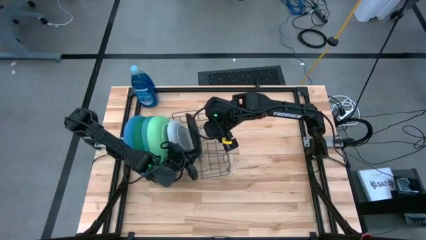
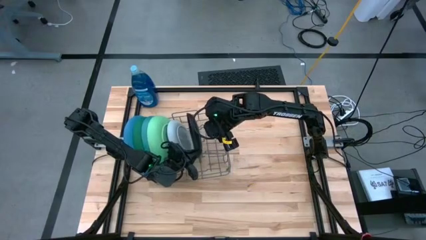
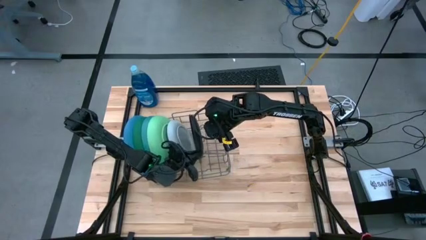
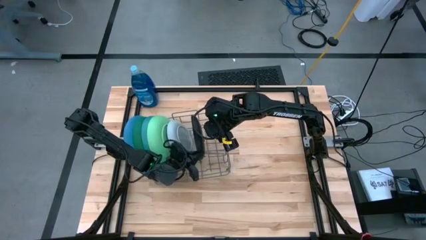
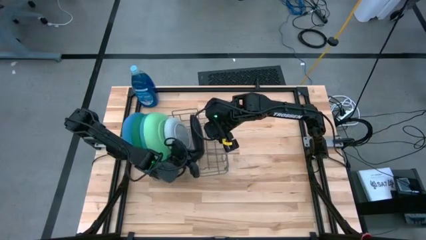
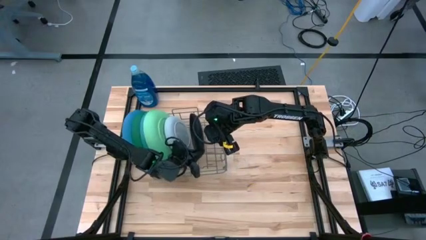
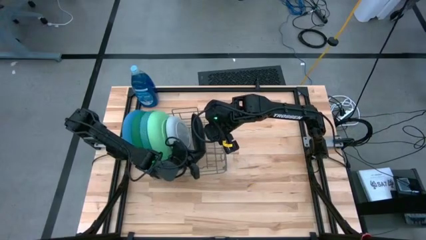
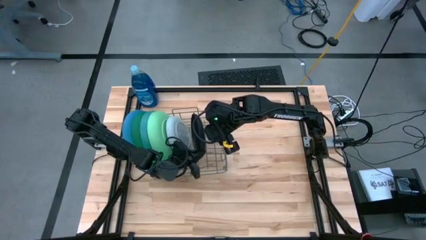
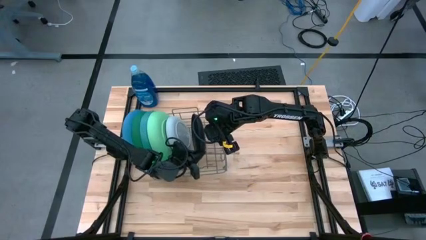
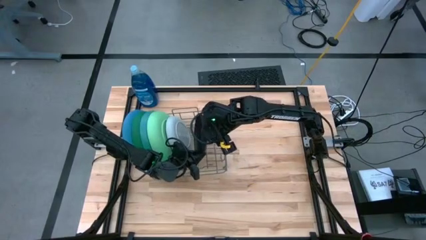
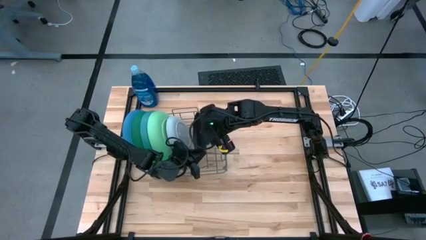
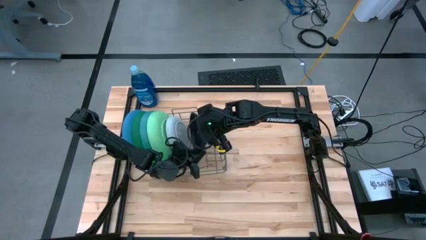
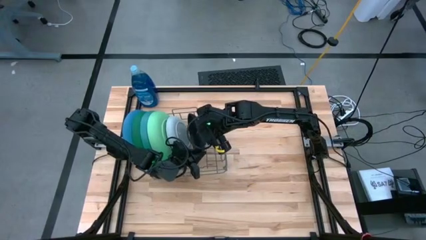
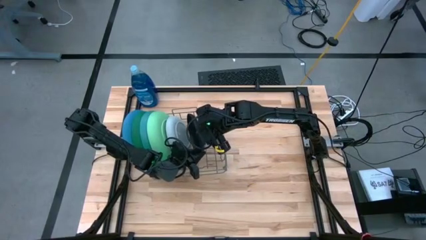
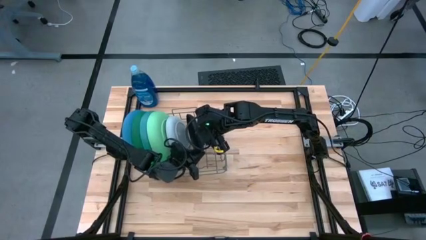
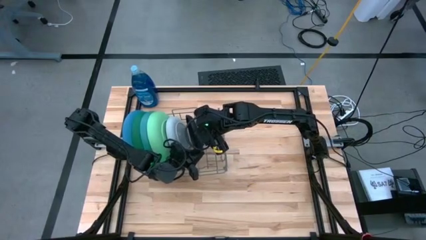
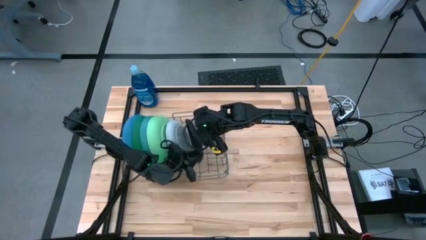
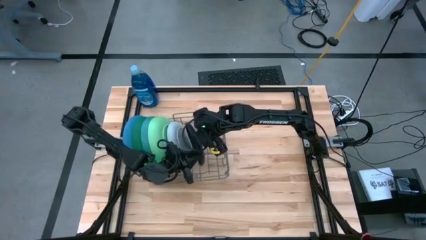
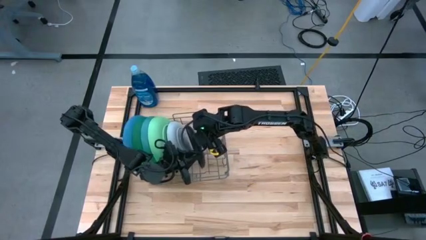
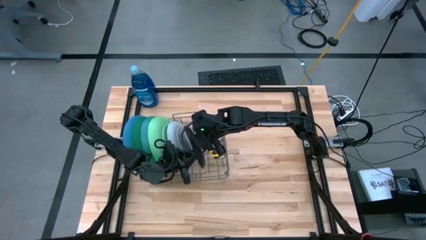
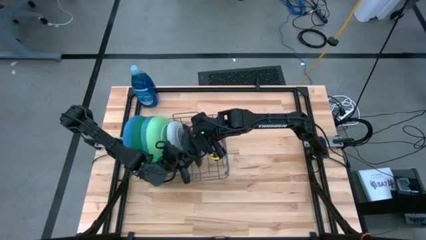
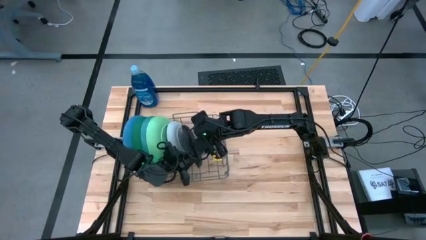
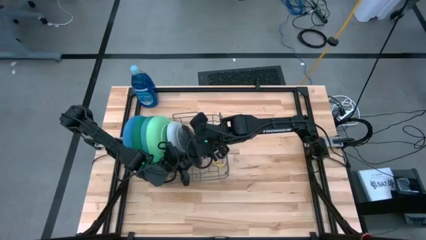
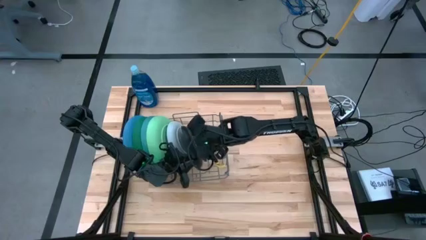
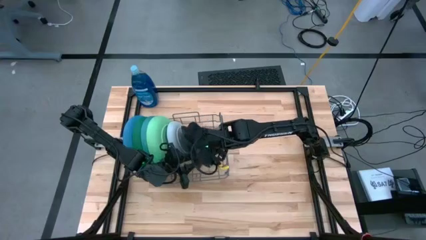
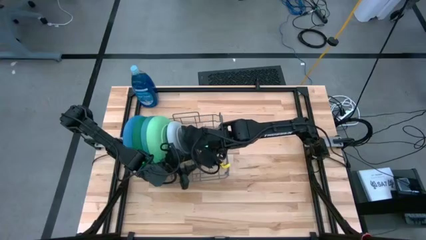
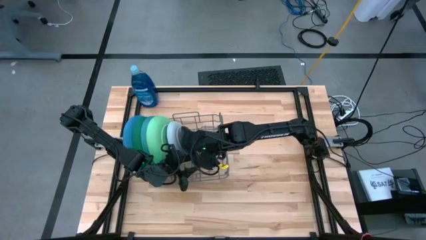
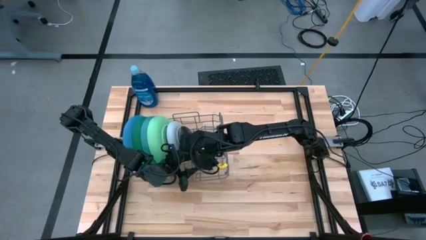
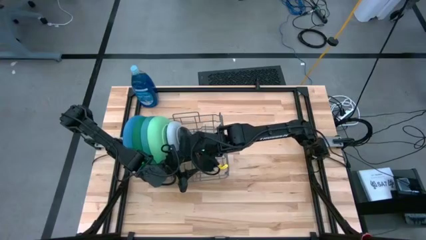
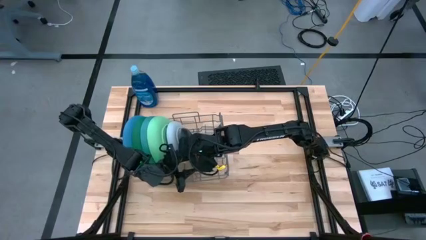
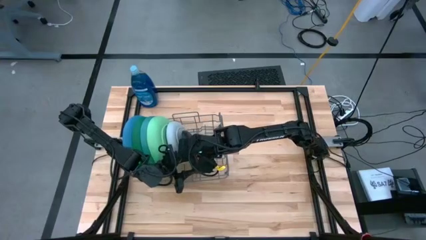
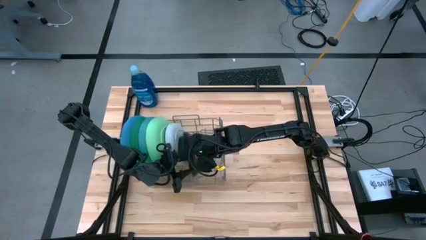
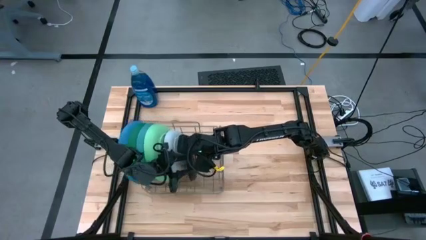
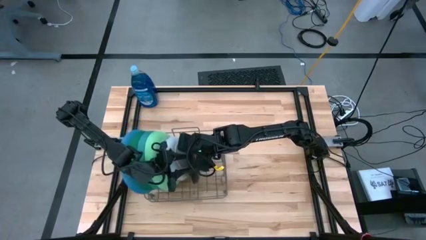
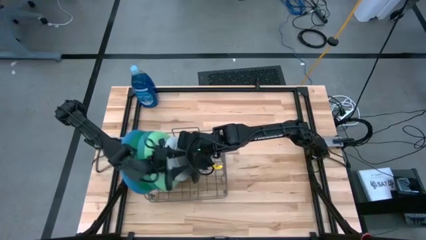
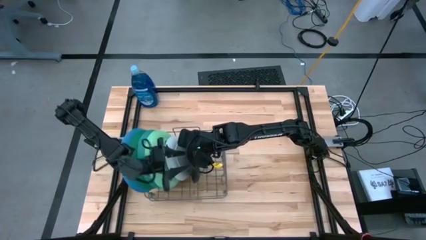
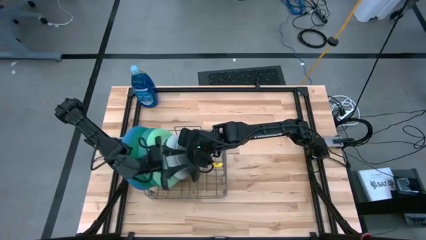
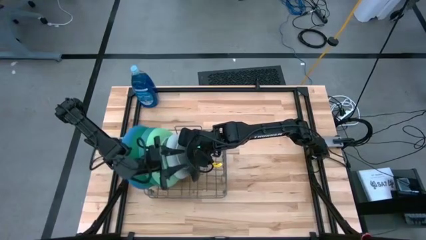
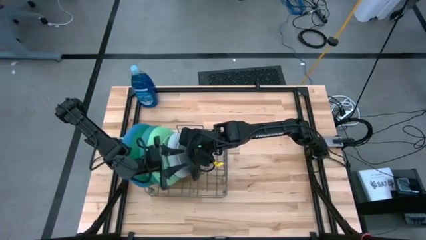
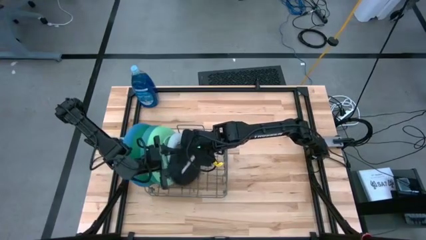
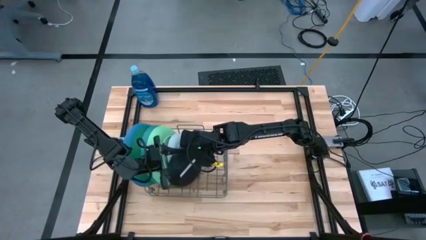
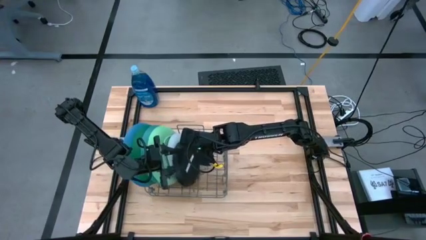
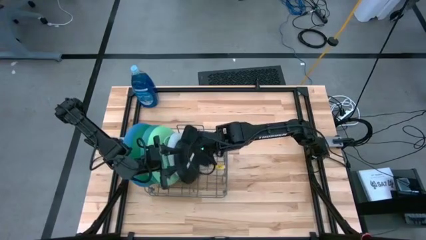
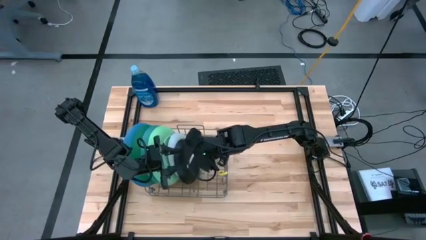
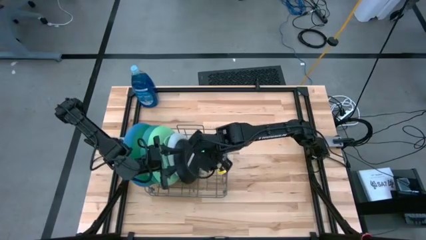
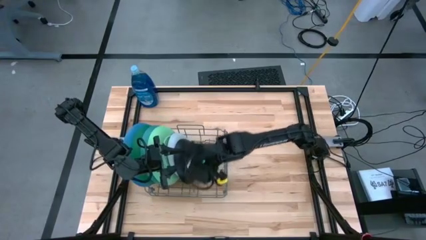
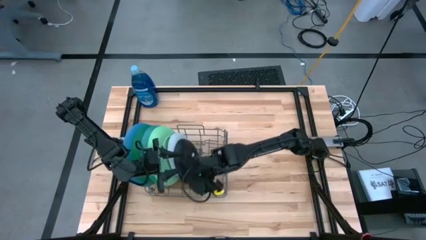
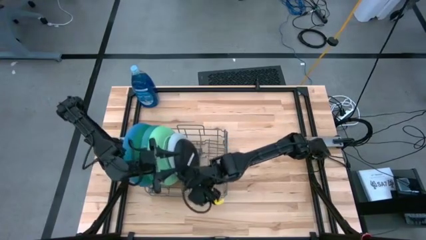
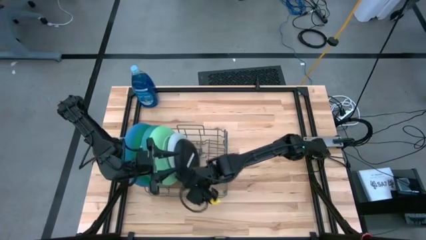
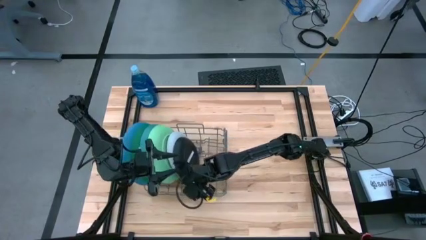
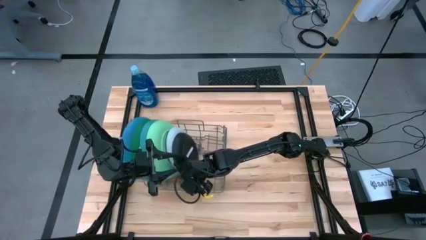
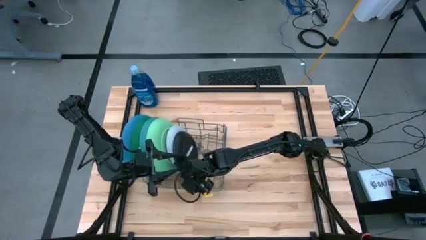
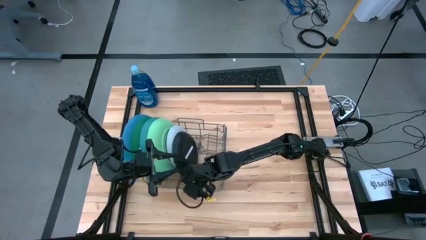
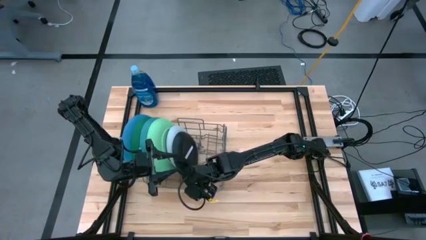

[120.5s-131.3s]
Task: Sort dishes
Put the black plate into the gray dish rack

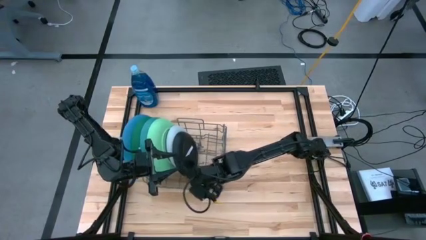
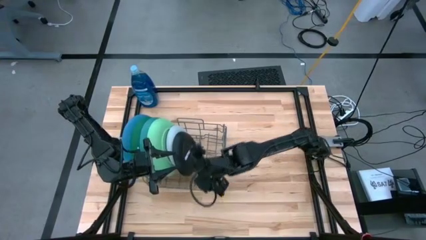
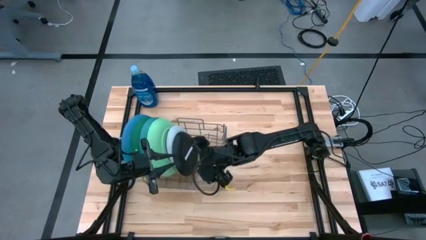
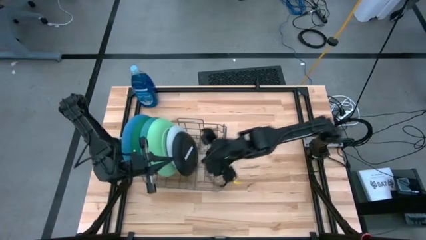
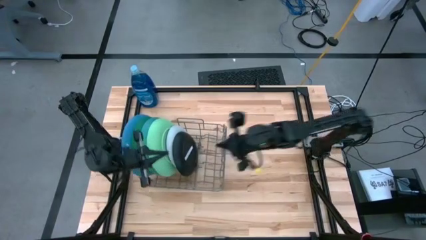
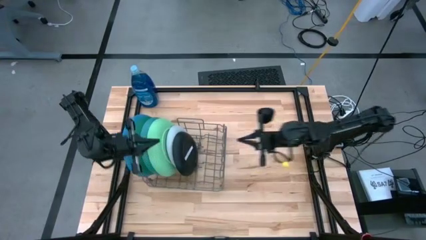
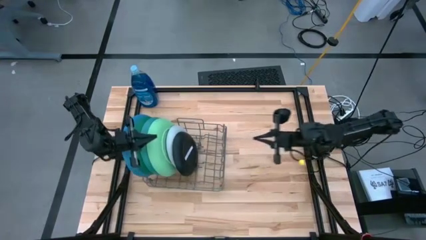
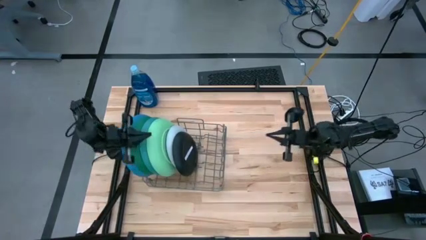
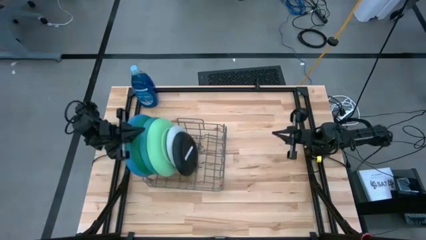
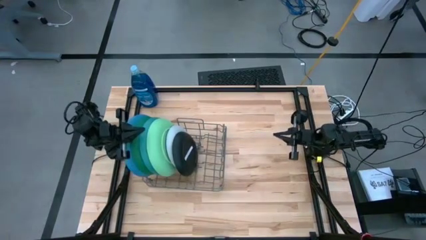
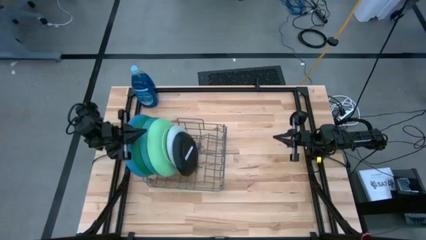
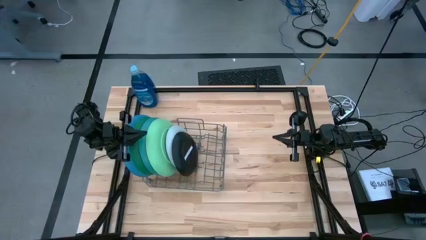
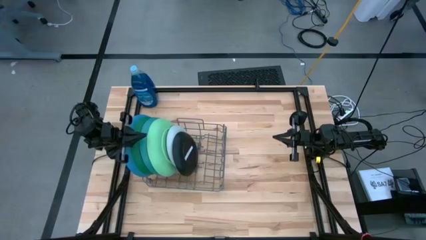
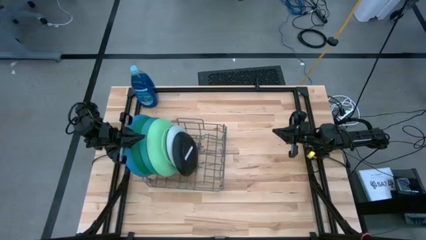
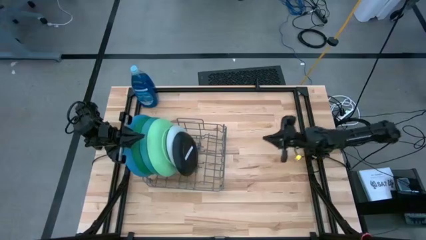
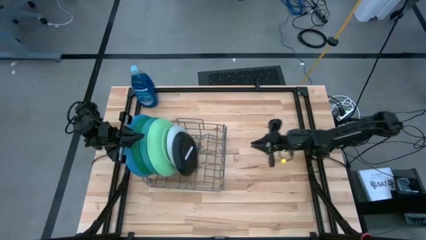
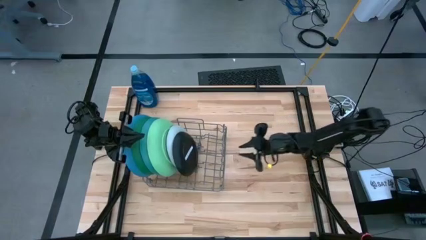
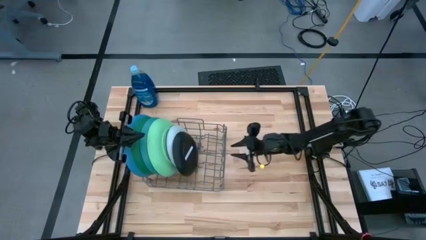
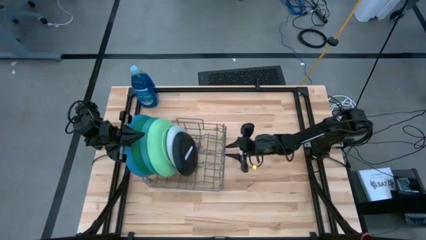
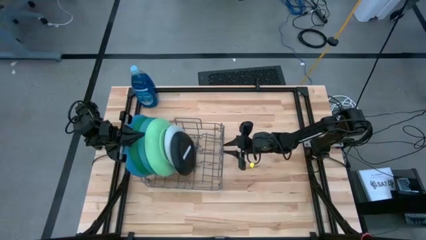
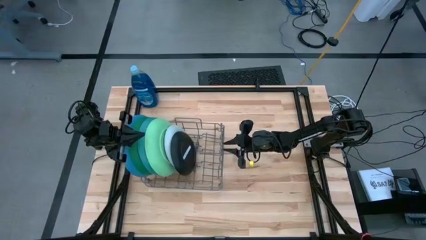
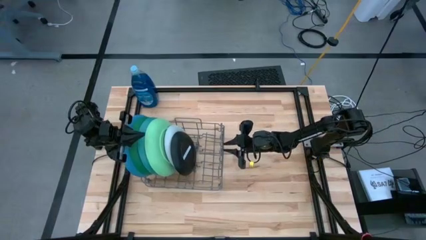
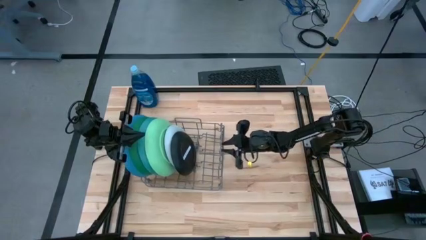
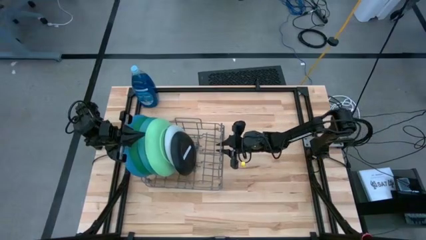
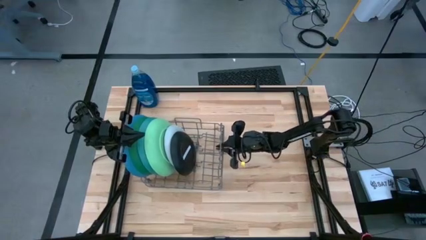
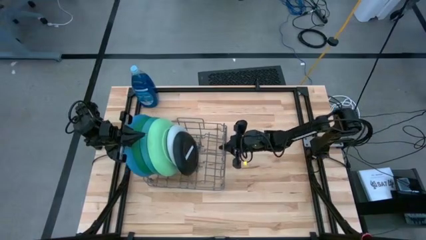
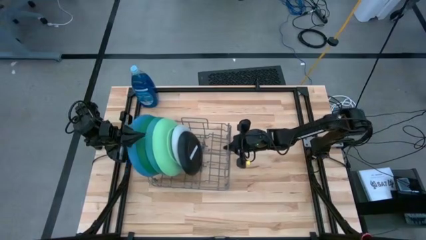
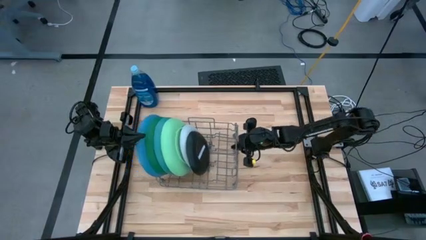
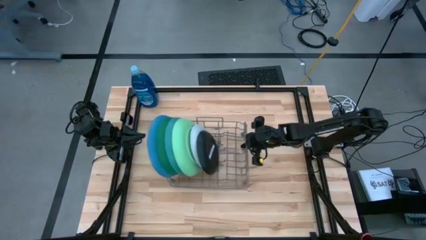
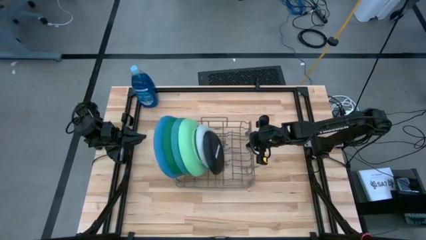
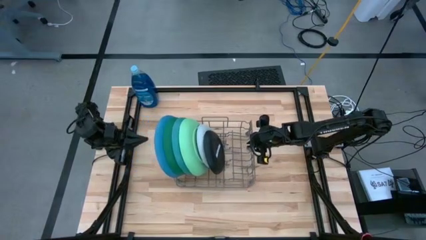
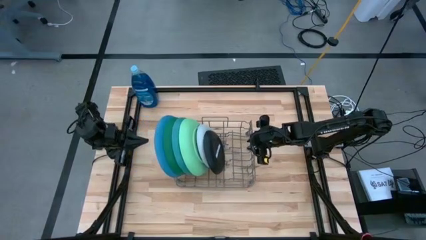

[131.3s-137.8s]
Move the gray dish rack to the center of the table
